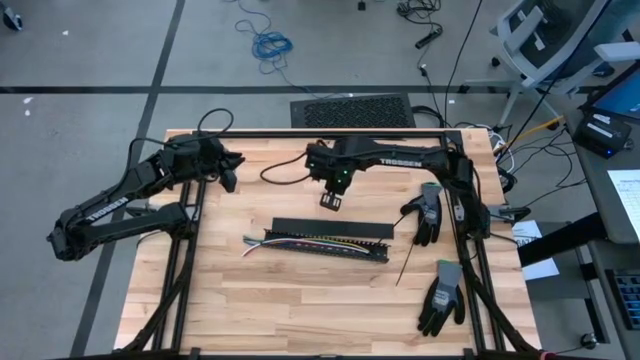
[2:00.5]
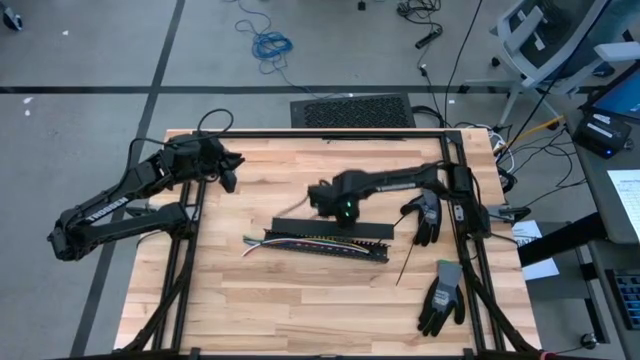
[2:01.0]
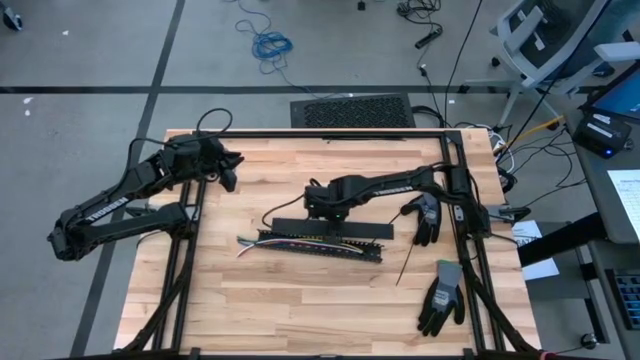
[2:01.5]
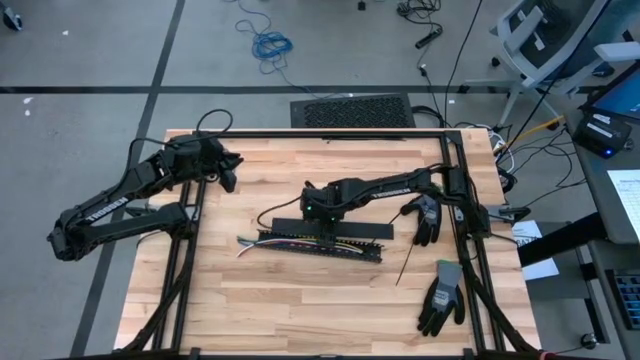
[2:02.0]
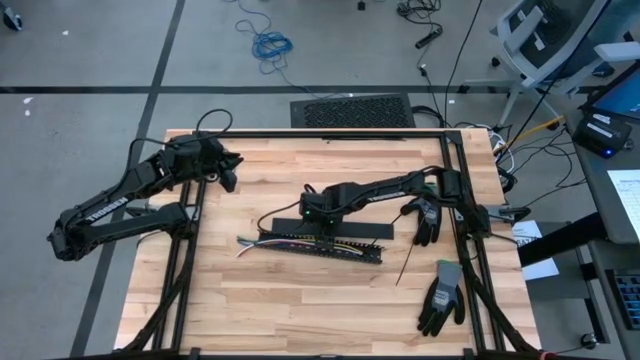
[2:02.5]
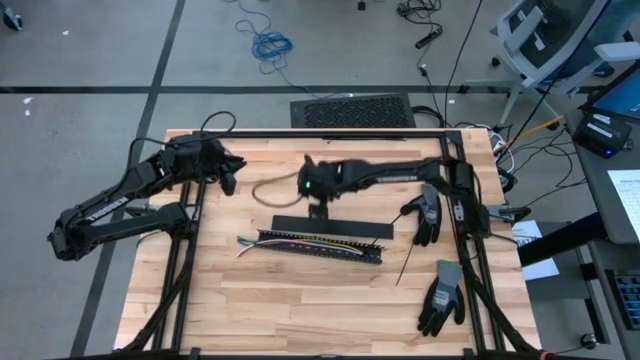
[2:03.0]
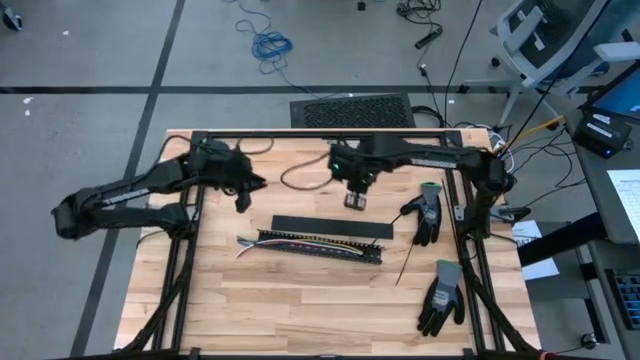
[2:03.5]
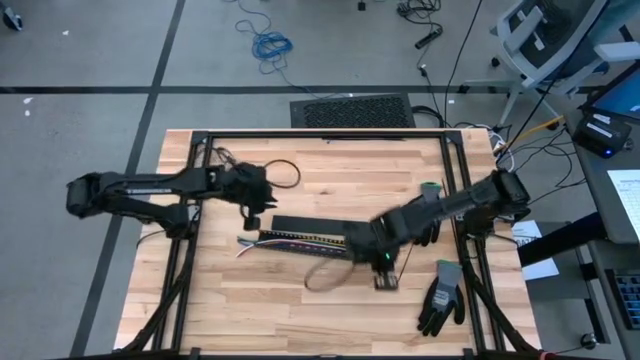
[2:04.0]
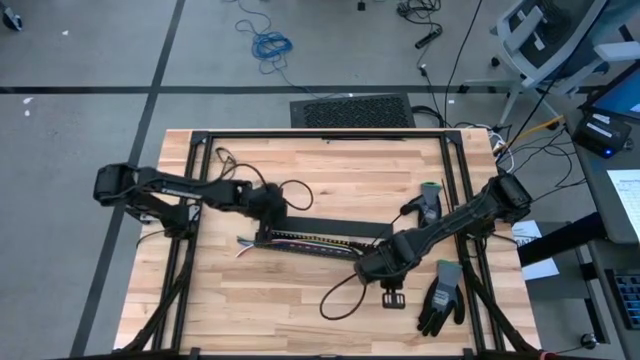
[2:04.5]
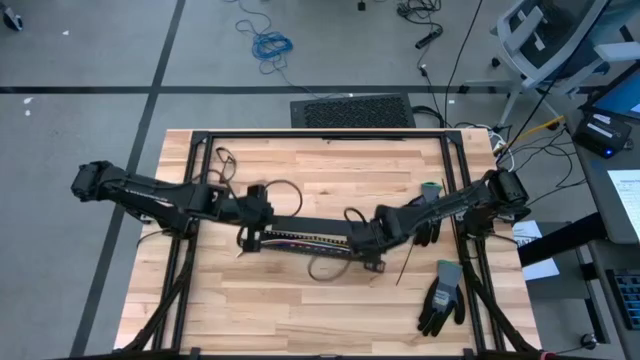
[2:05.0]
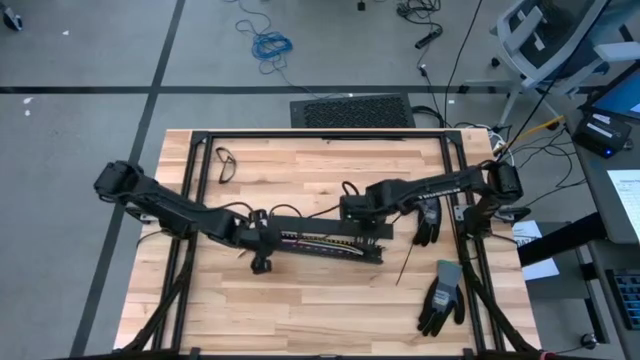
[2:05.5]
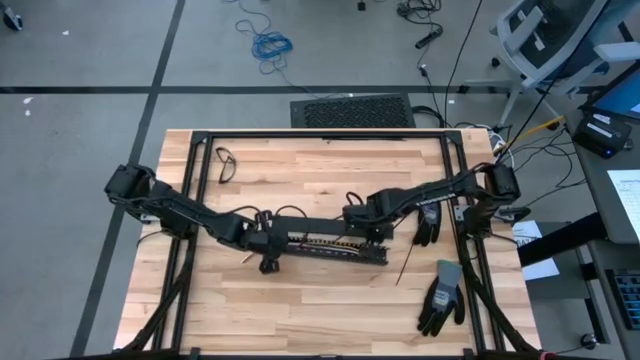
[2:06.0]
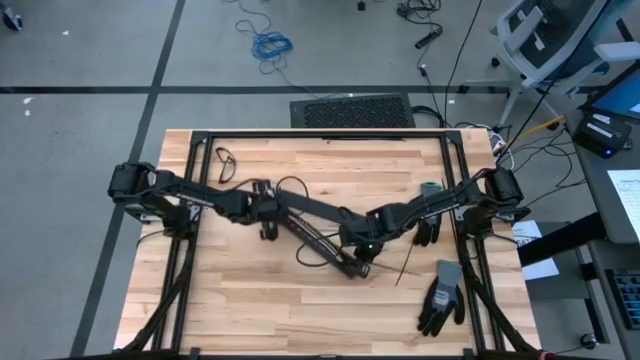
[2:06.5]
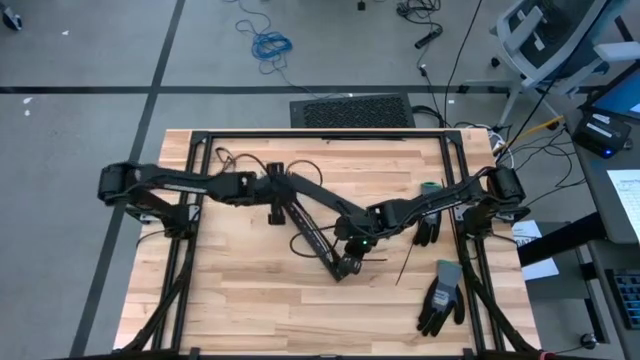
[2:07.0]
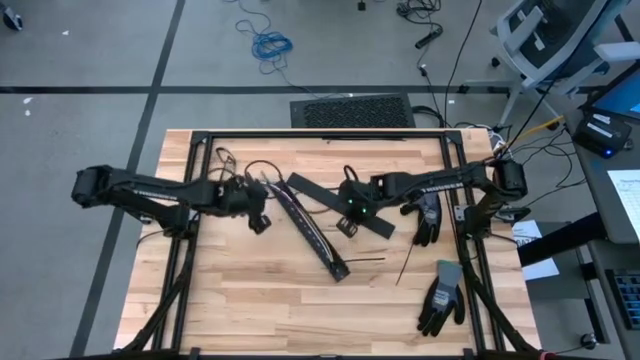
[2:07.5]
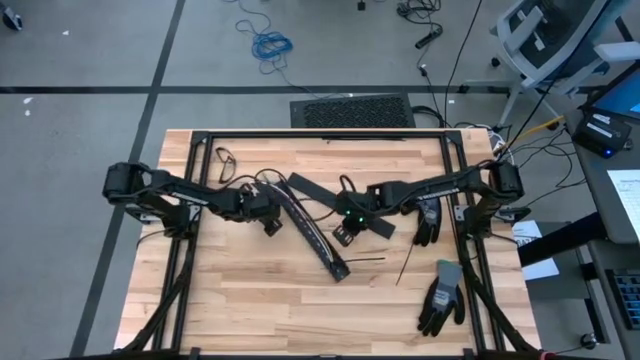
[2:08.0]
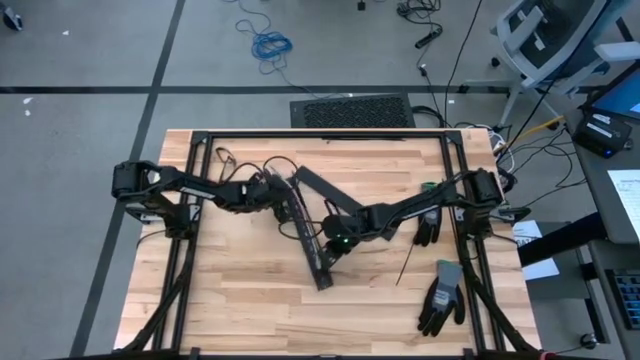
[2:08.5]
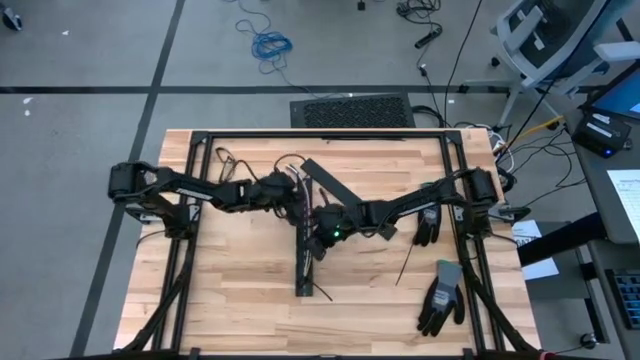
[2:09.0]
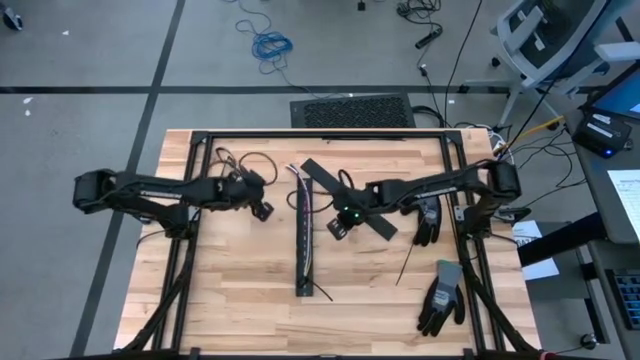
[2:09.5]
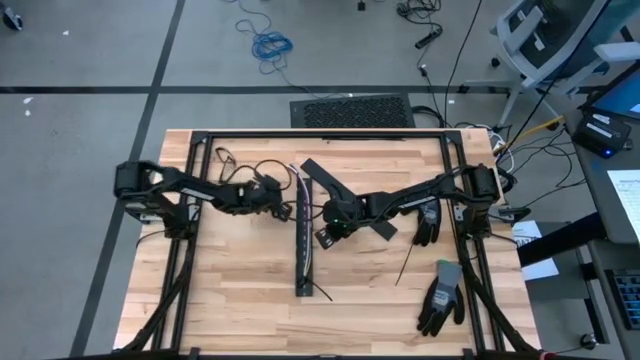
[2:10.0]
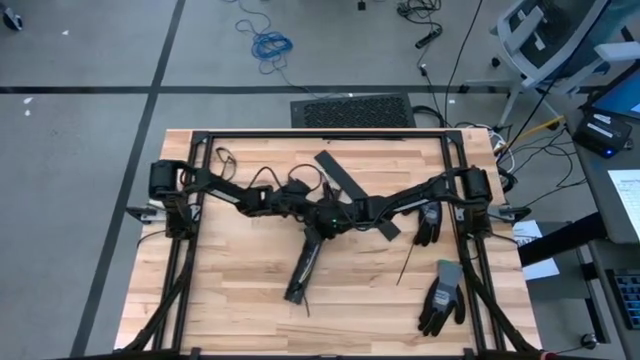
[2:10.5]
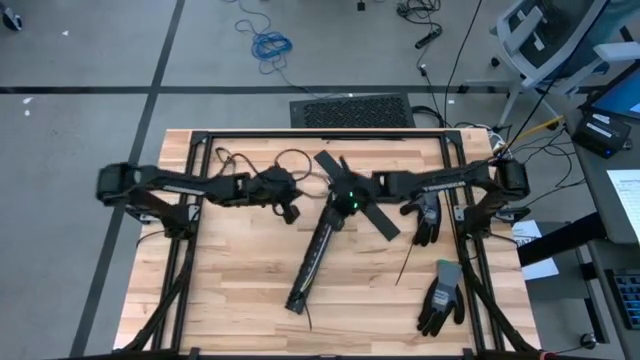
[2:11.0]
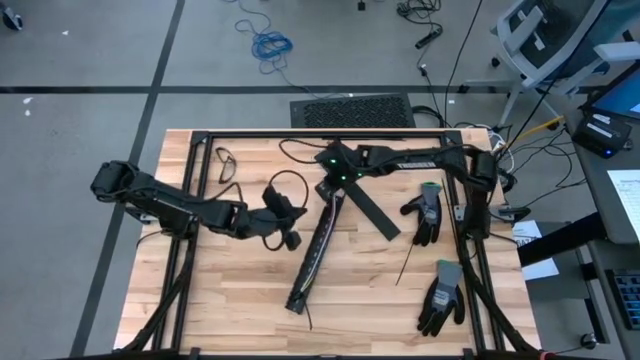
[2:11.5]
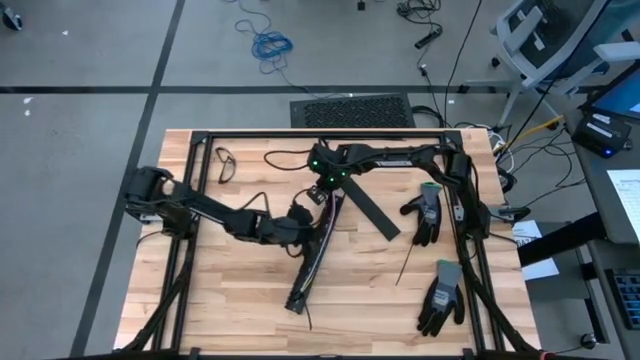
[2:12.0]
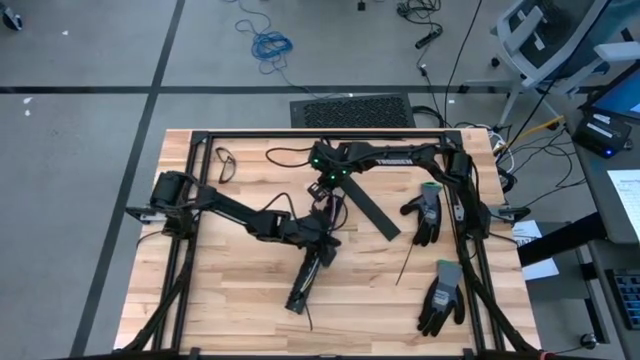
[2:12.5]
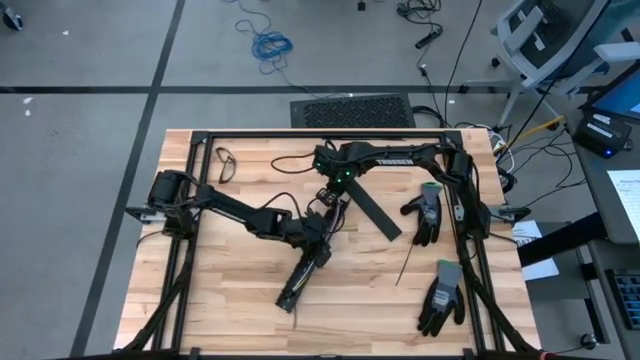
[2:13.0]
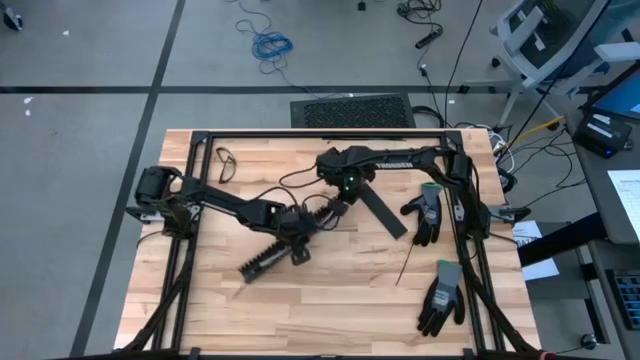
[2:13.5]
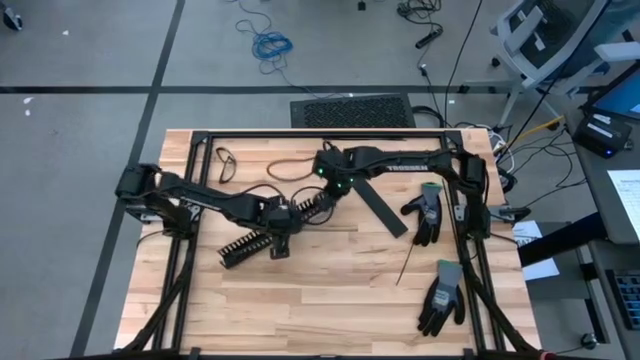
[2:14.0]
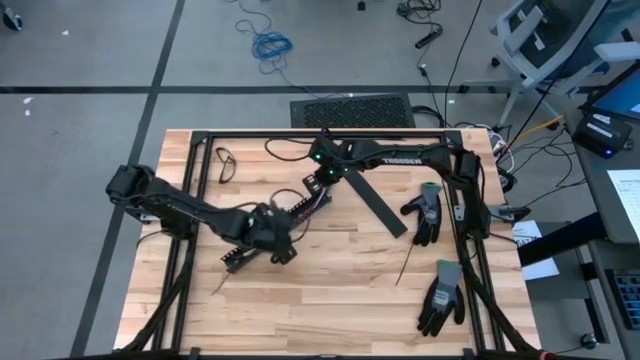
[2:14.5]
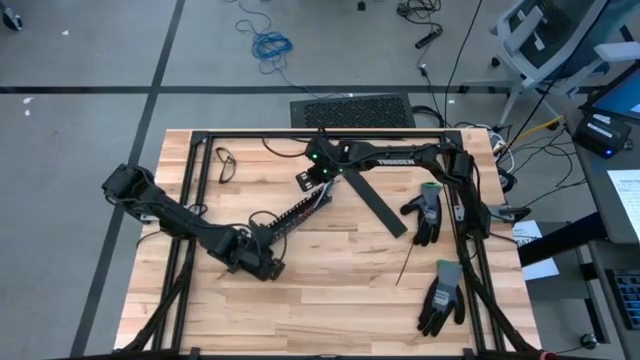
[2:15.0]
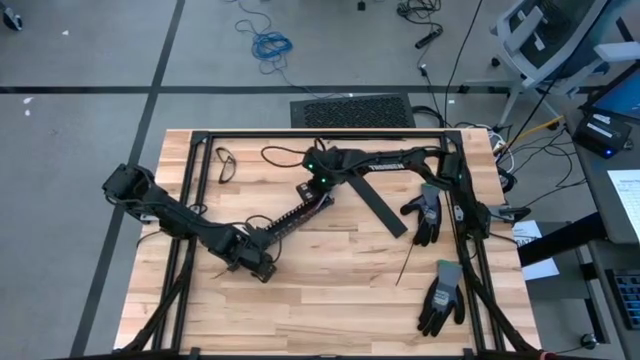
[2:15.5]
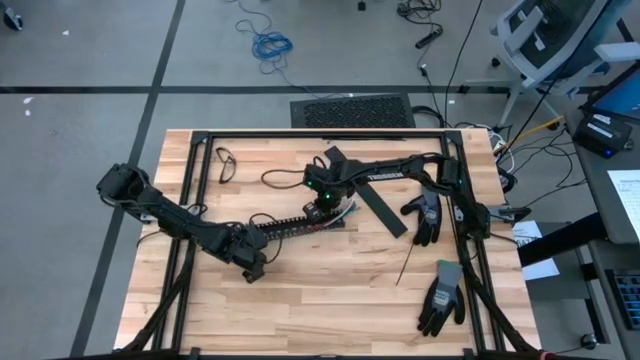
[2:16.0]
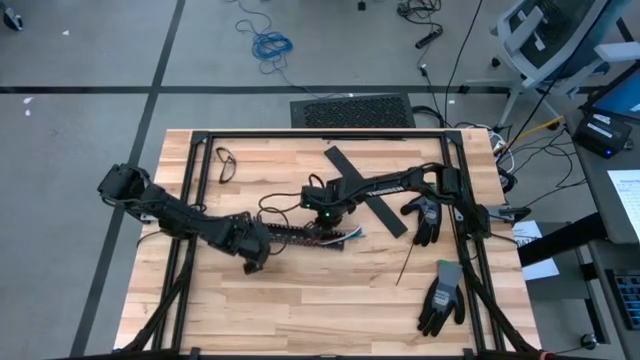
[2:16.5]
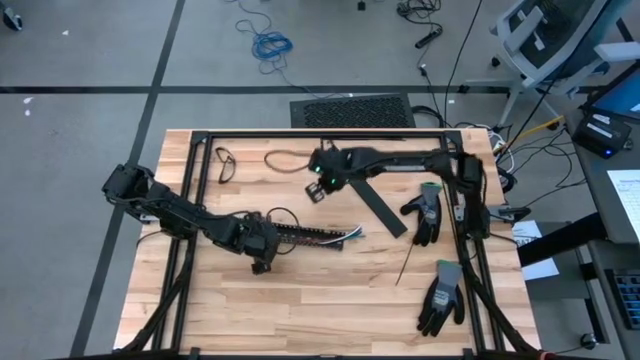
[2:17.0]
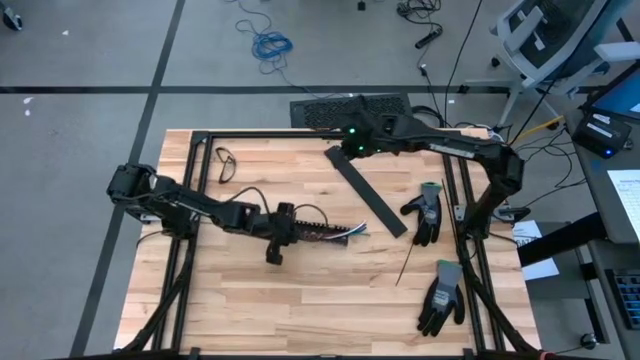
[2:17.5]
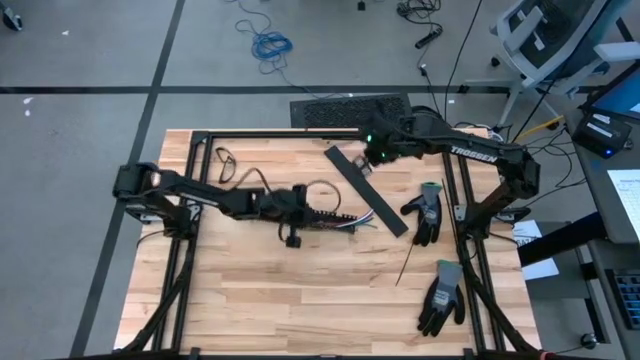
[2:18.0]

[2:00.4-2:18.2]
Task: Ziptie cables
Adjust the black cable duct

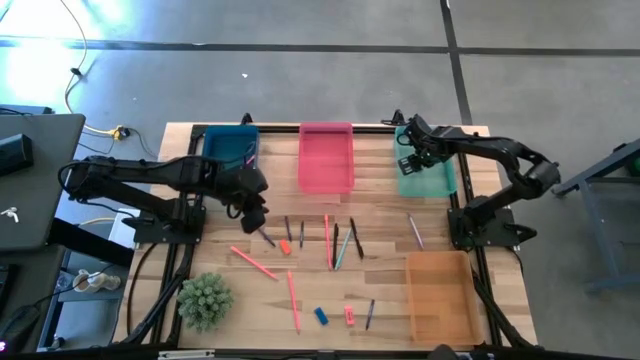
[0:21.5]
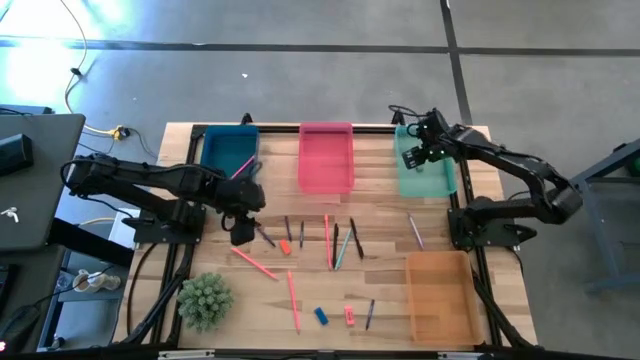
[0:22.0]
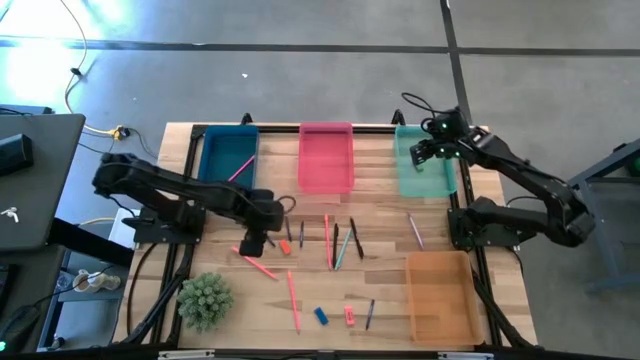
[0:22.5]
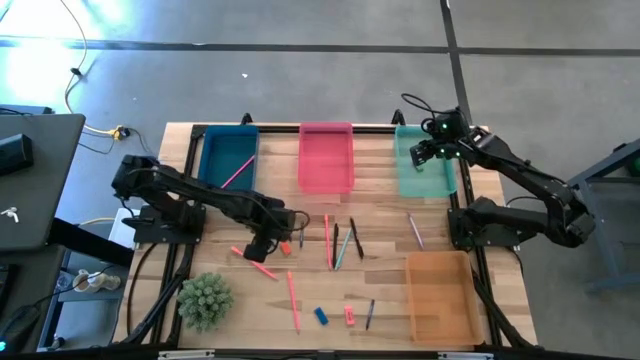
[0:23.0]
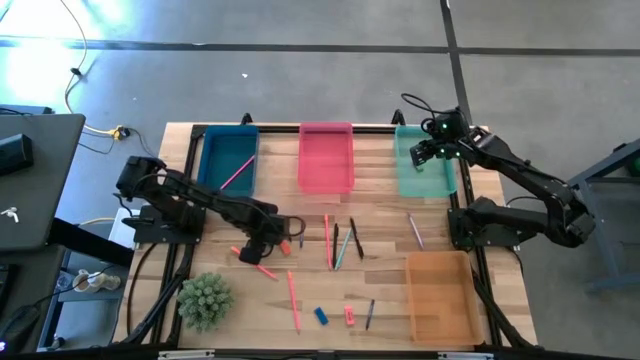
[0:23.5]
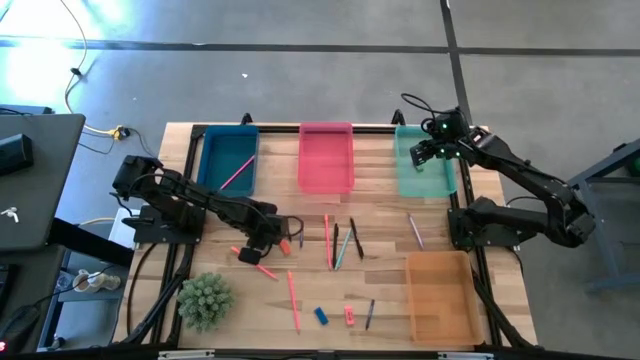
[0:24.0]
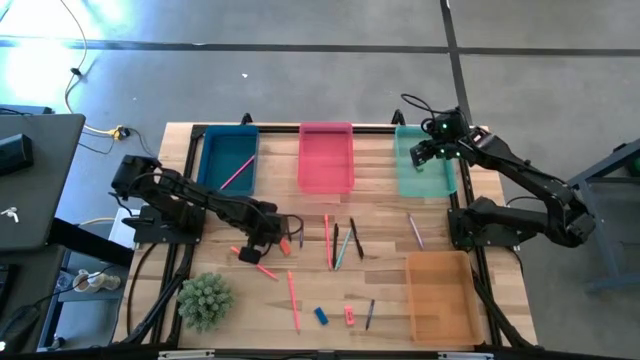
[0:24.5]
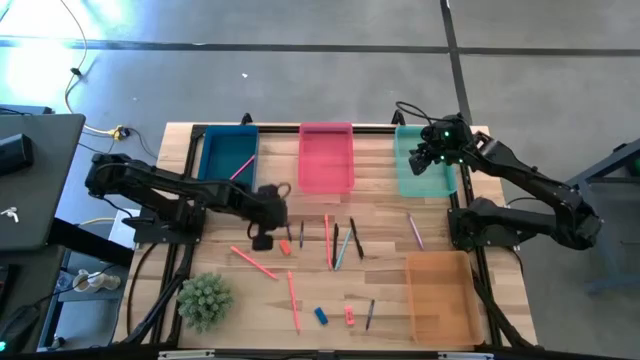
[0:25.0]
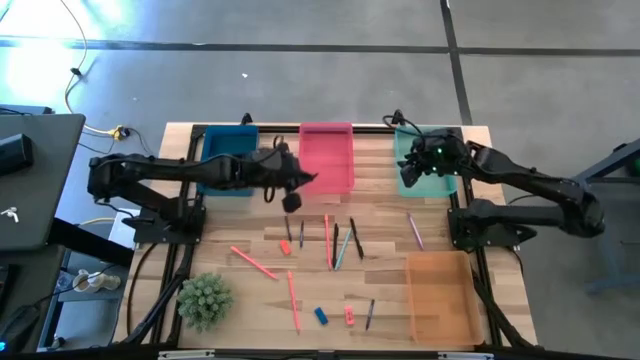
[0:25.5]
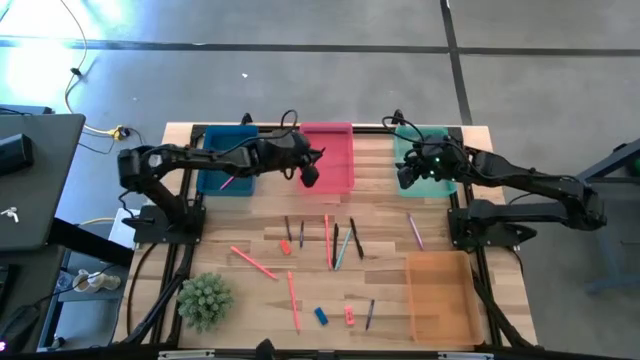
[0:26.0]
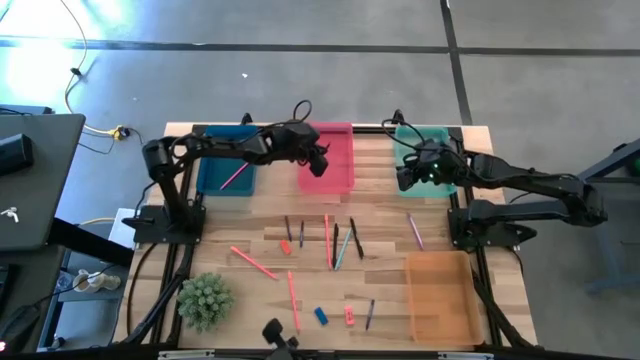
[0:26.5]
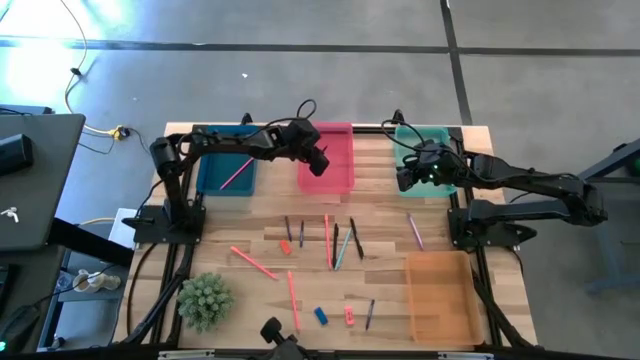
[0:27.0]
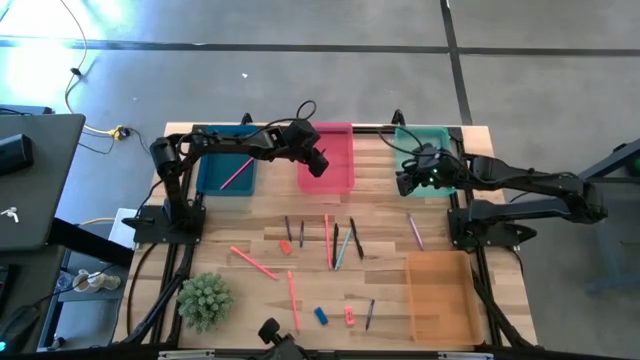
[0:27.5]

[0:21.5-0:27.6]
Task: Sort crayons/erasers/pens/pencils in bins
Put the blue crayon into the red bin
